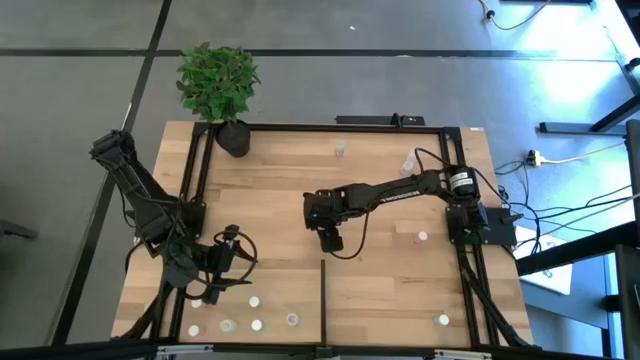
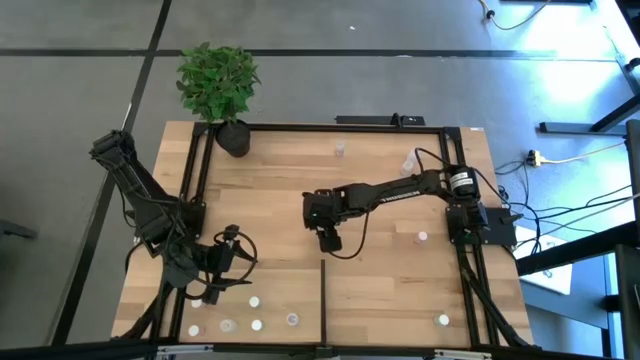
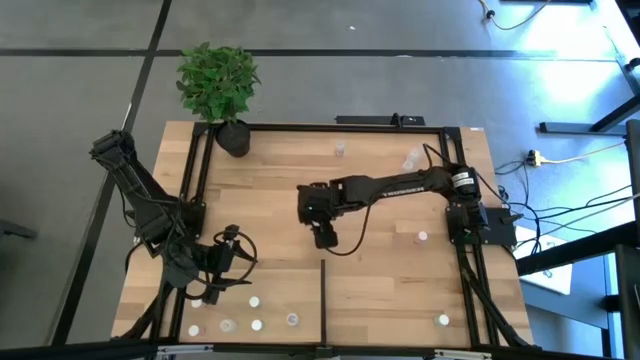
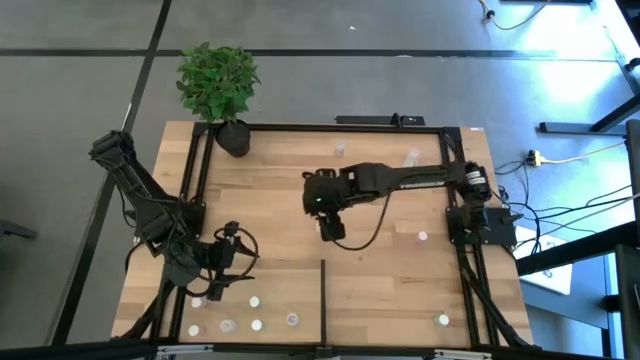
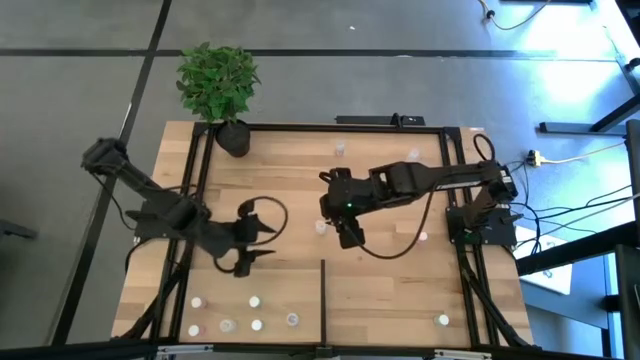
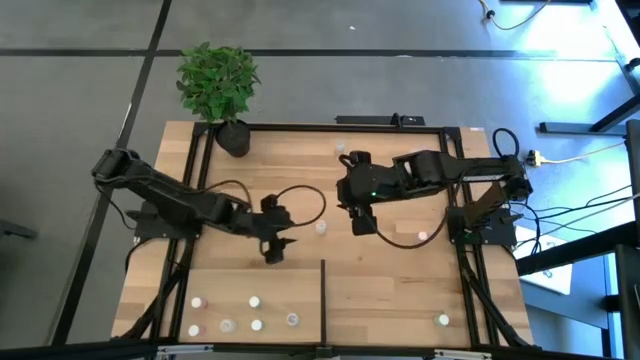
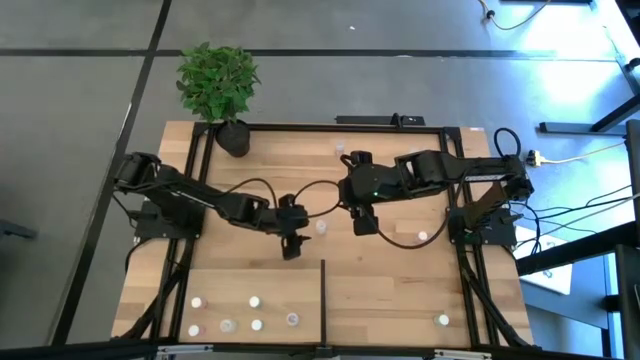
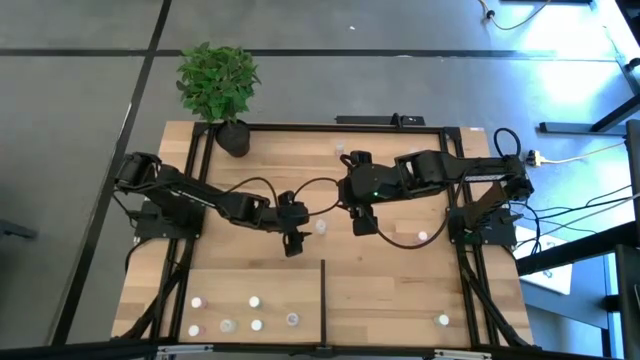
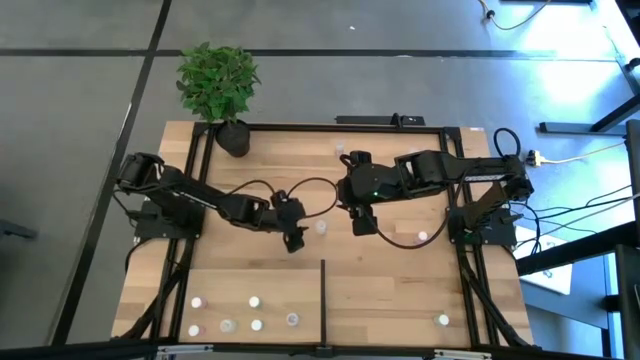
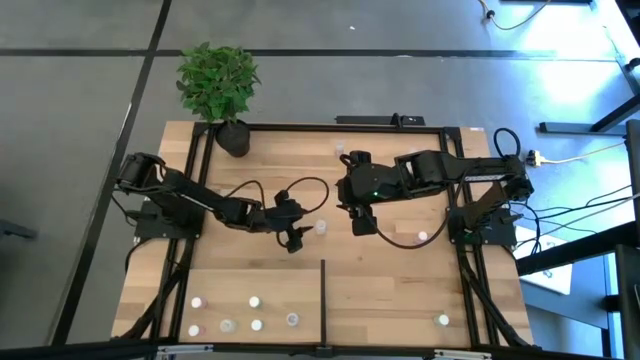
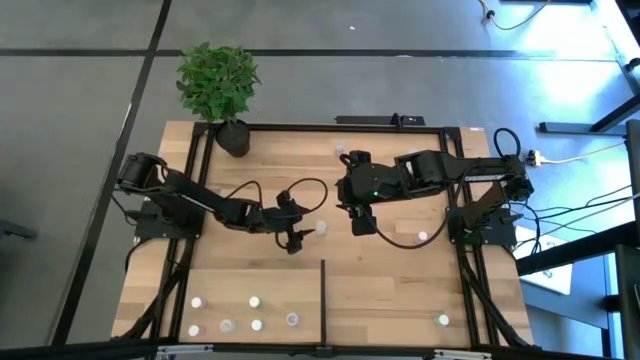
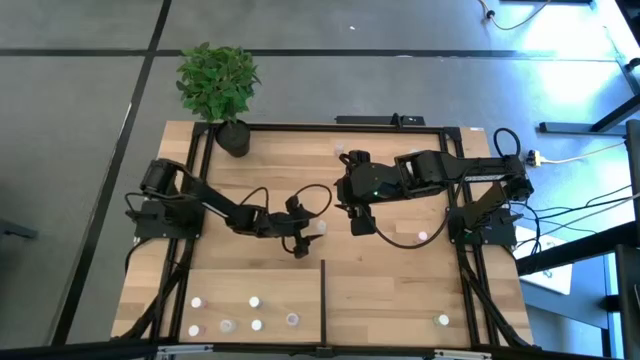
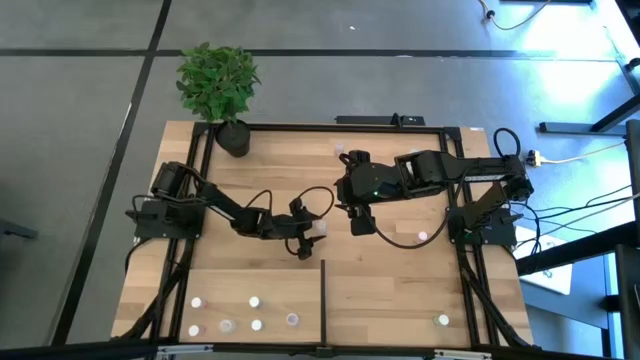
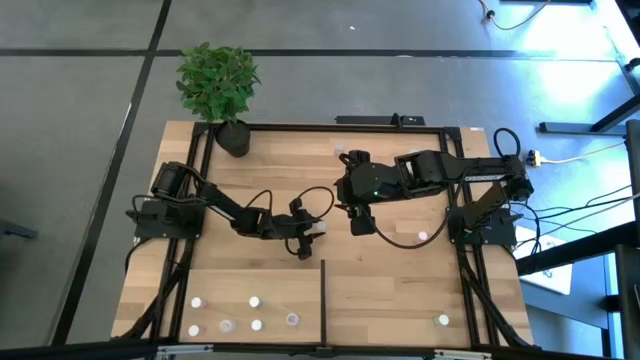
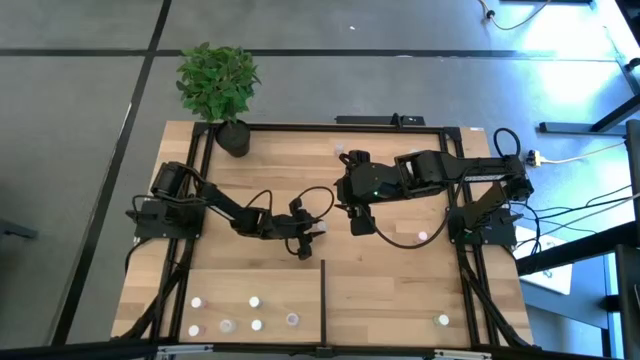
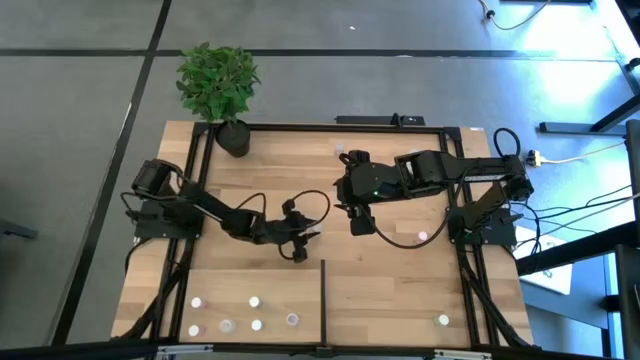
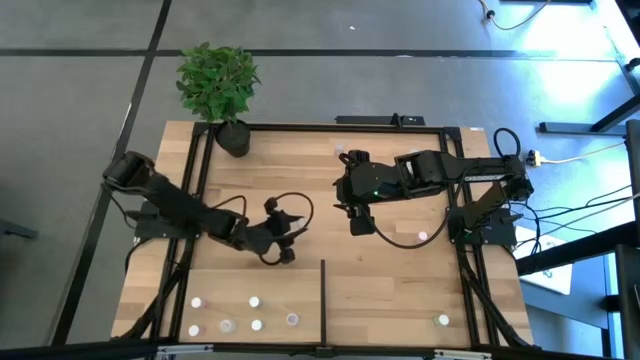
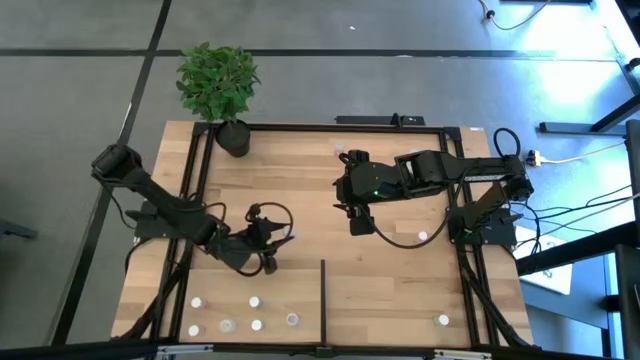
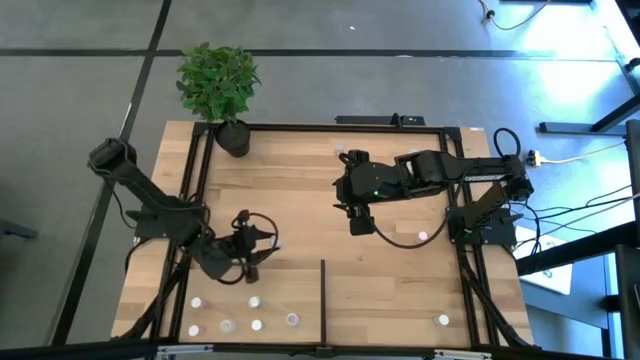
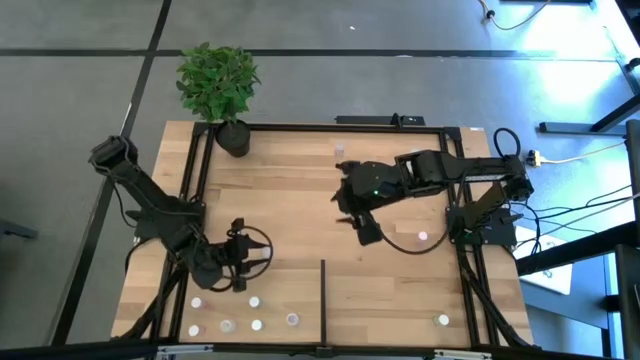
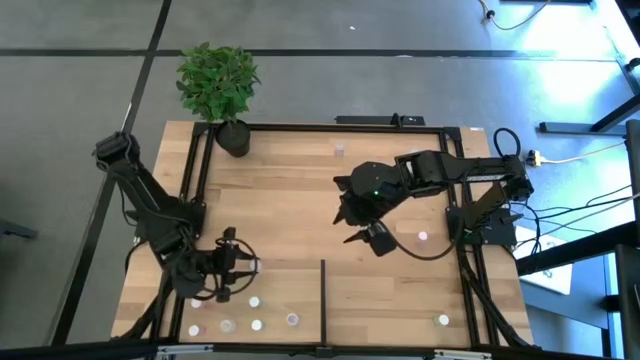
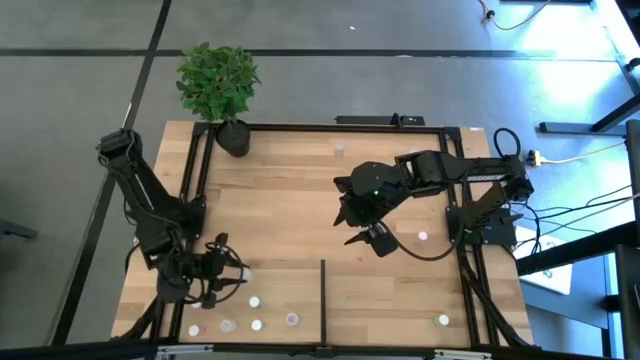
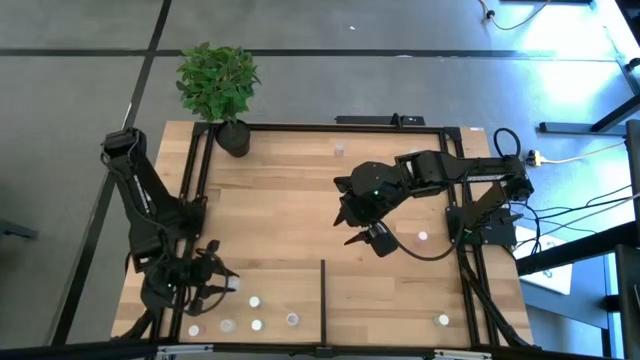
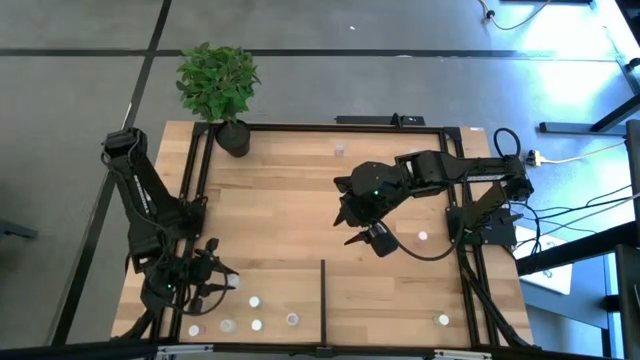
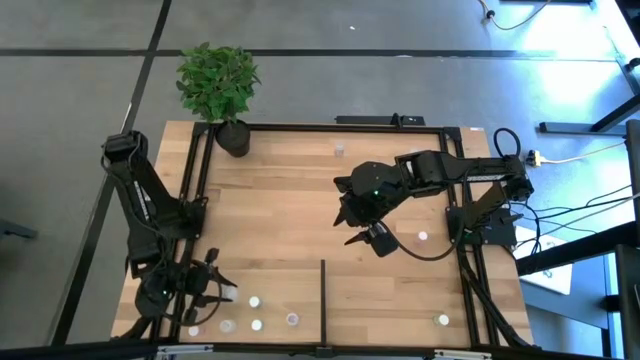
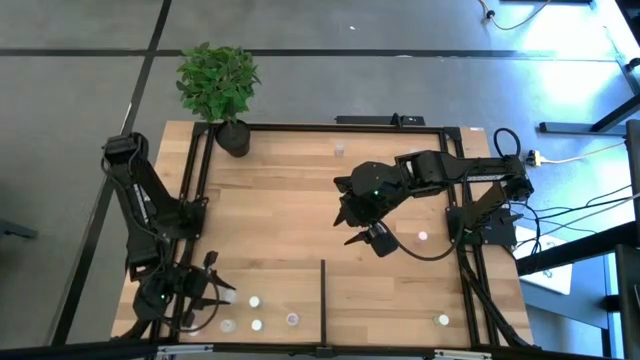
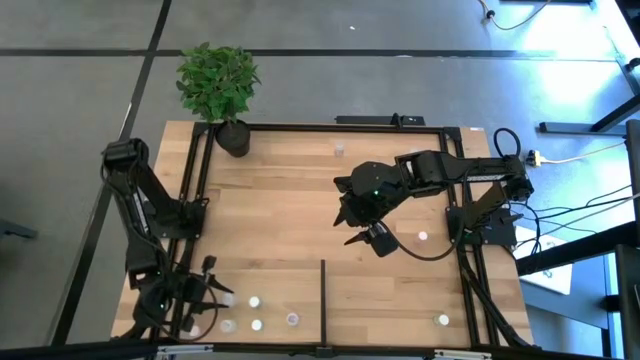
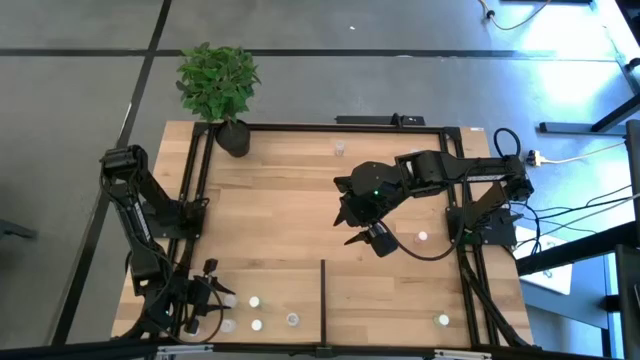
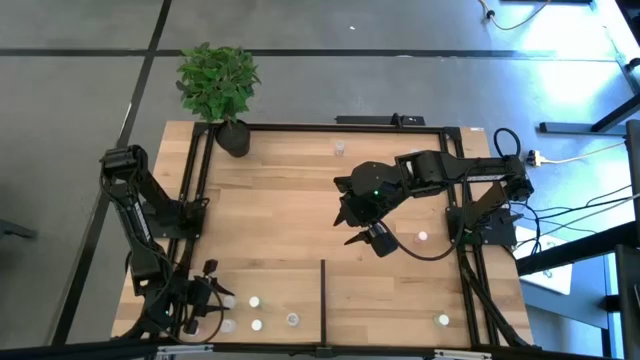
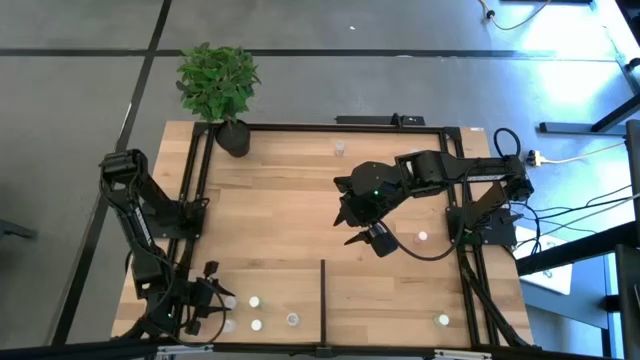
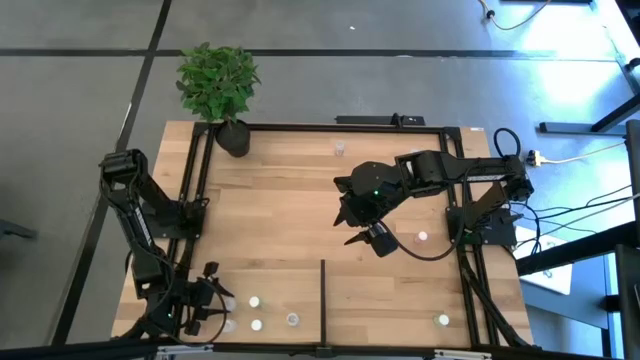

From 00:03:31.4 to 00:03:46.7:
Task: Pick and place medicine bottles onto shelf by color
Put the bottom white pill bottle on the shelf aligned with the other white pill bottle

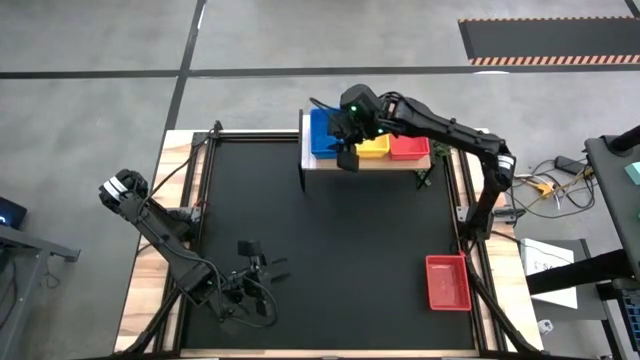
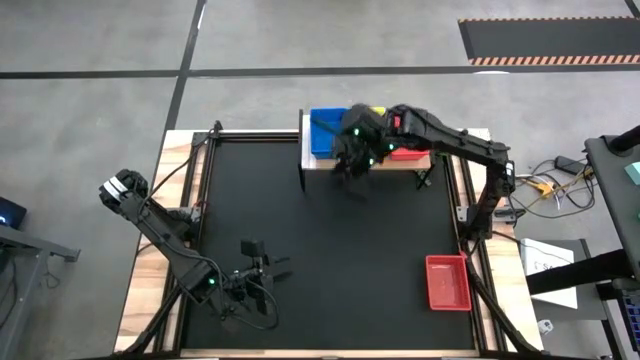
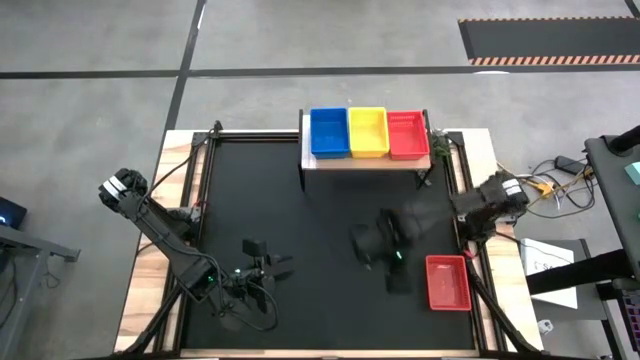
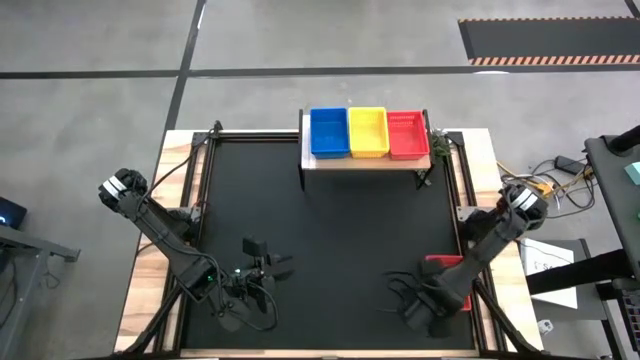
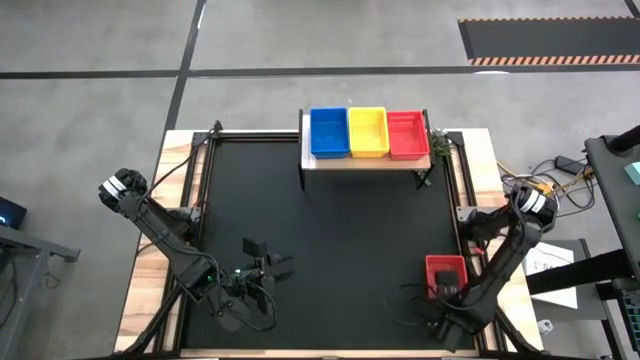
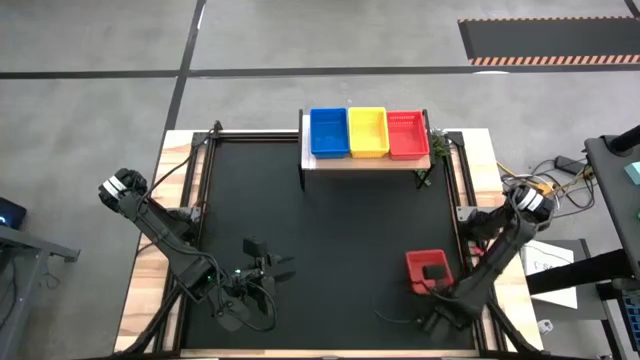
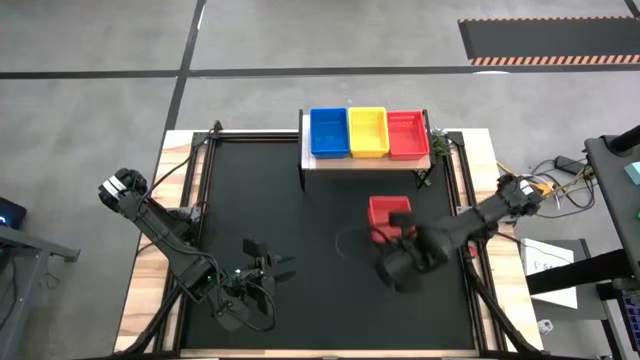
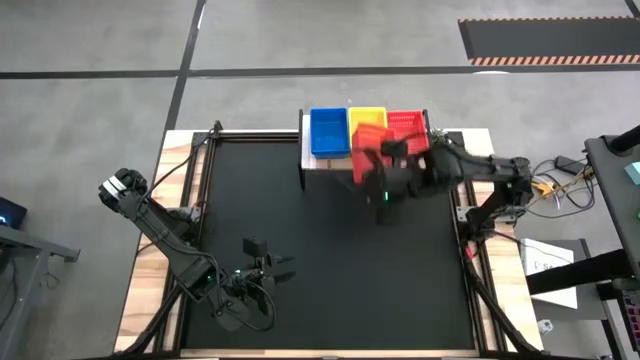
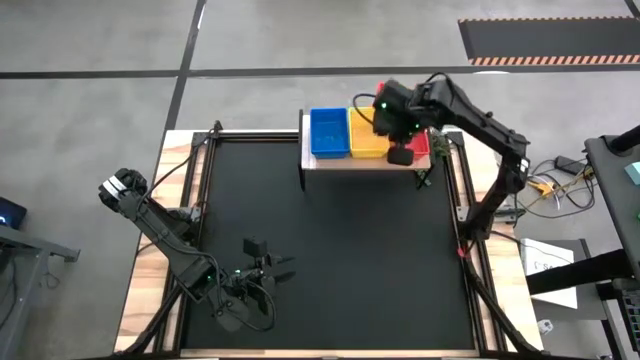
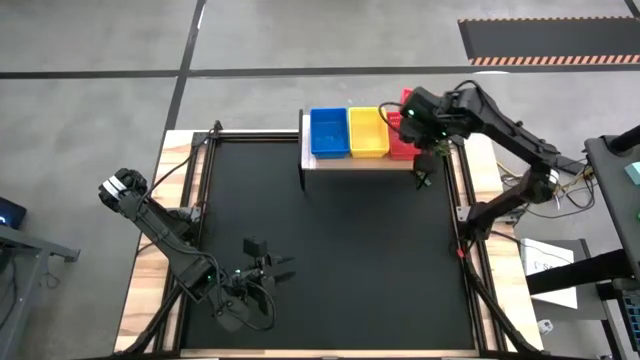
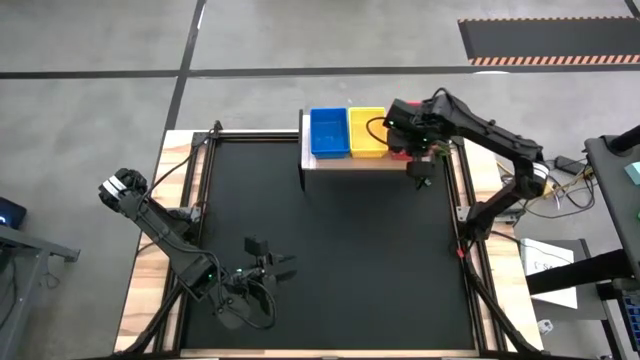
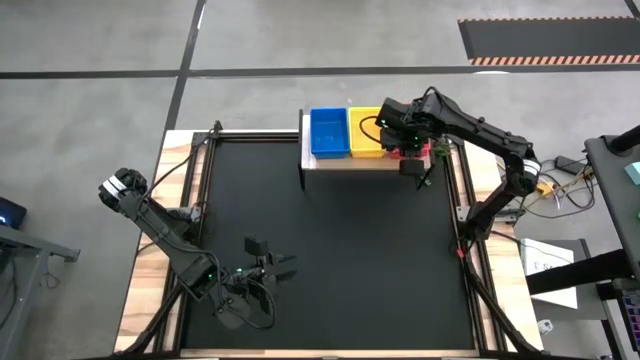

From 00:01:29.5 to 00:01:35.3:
Task: Stack baskets on shelf by color
Stack the red bin on top of the red bin on the shelf
